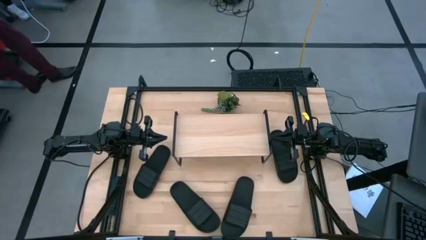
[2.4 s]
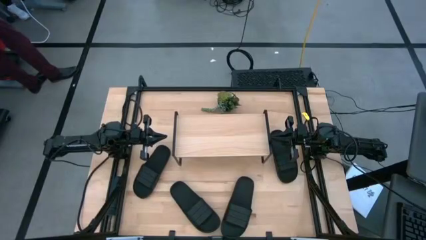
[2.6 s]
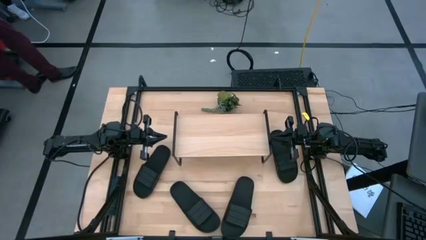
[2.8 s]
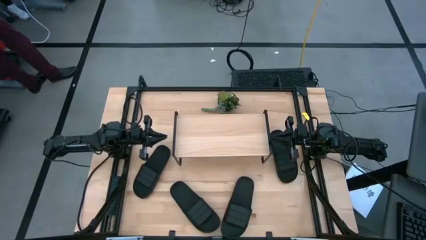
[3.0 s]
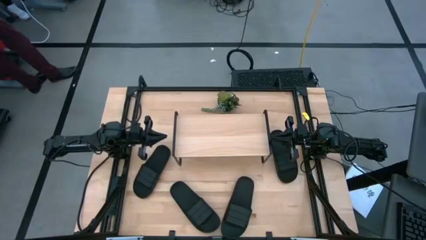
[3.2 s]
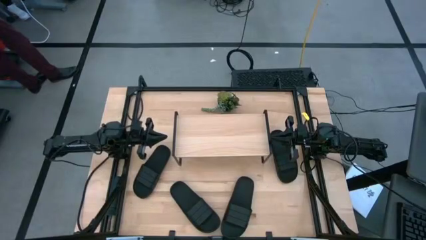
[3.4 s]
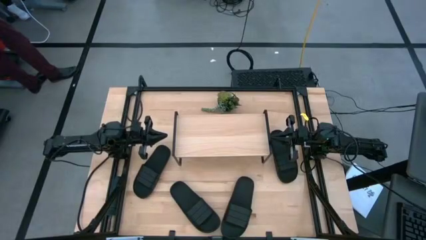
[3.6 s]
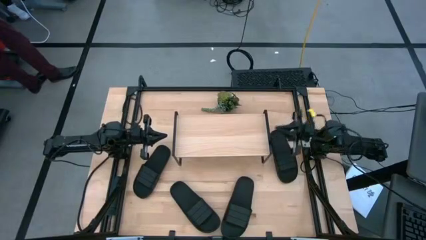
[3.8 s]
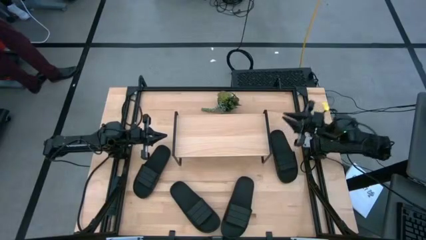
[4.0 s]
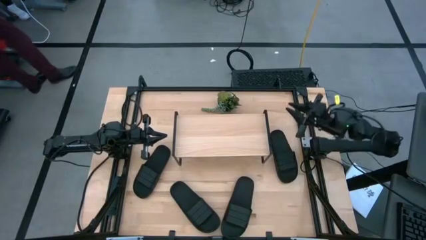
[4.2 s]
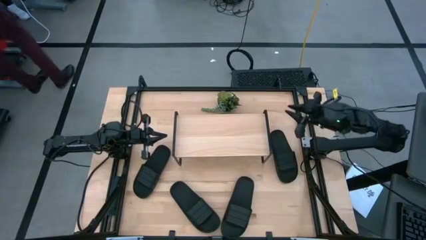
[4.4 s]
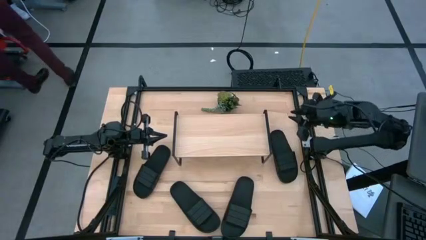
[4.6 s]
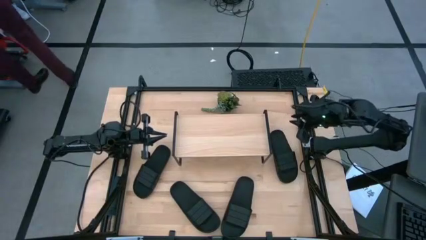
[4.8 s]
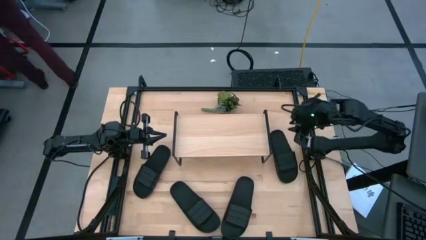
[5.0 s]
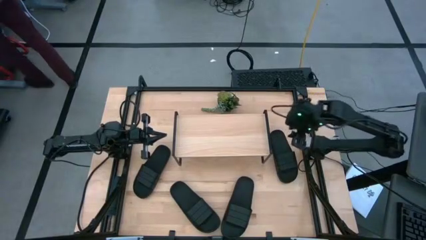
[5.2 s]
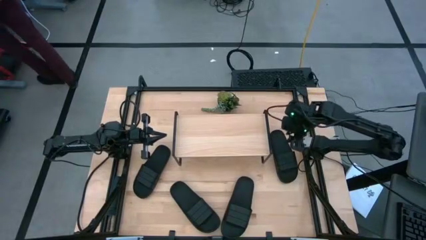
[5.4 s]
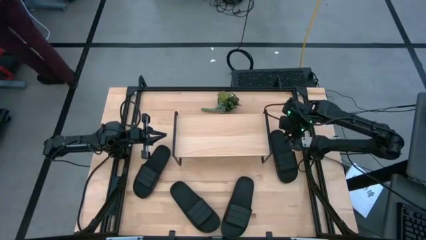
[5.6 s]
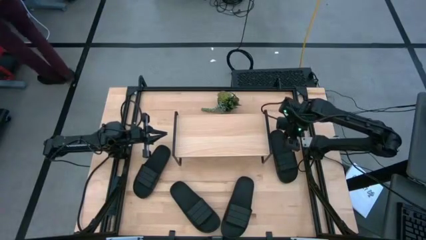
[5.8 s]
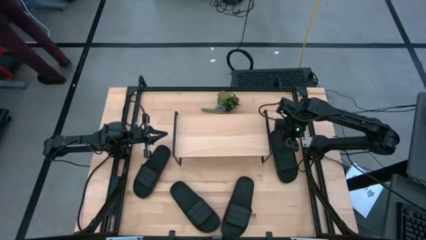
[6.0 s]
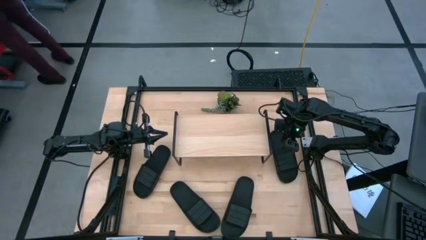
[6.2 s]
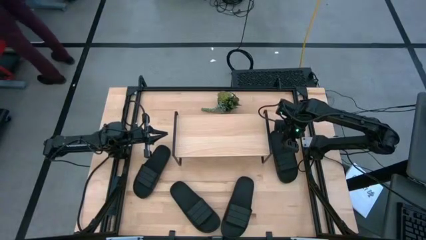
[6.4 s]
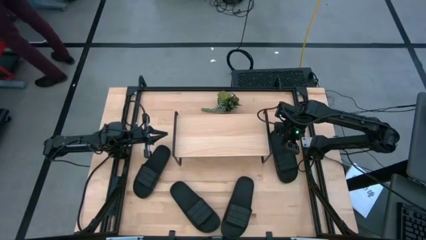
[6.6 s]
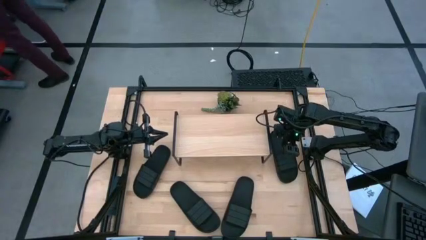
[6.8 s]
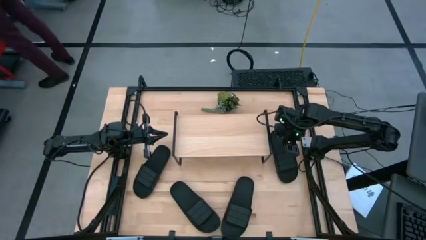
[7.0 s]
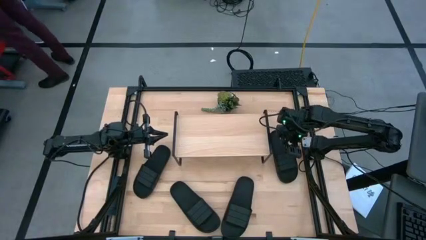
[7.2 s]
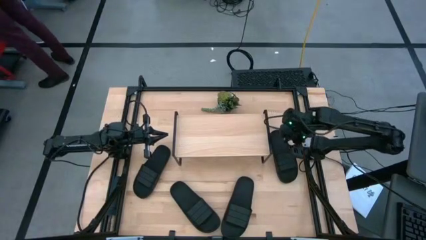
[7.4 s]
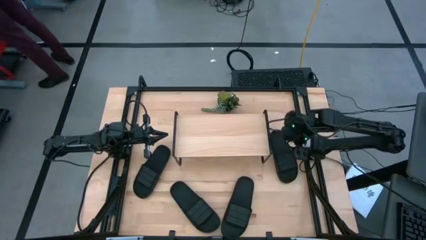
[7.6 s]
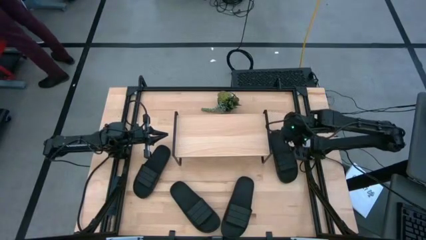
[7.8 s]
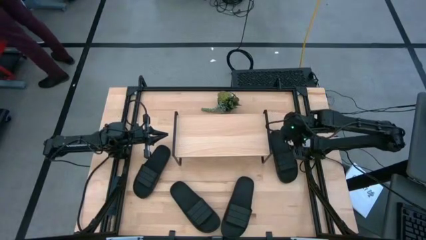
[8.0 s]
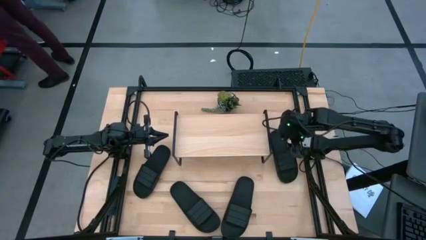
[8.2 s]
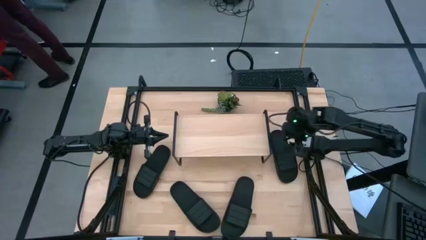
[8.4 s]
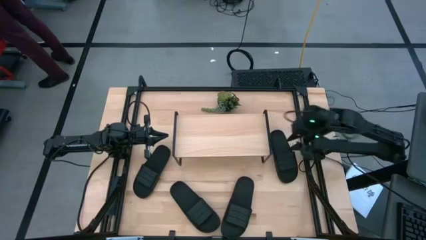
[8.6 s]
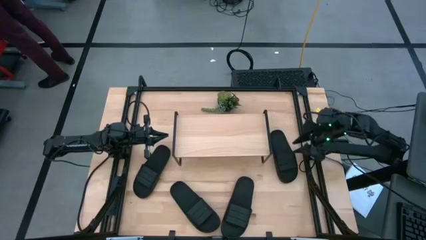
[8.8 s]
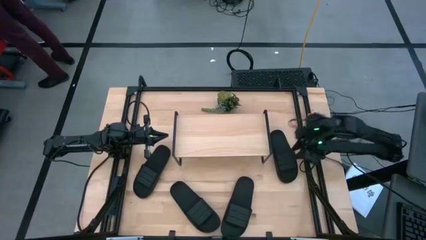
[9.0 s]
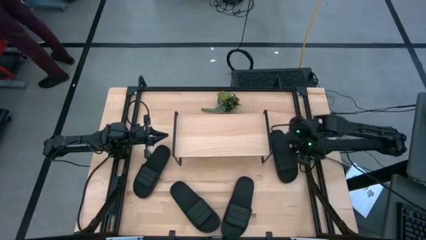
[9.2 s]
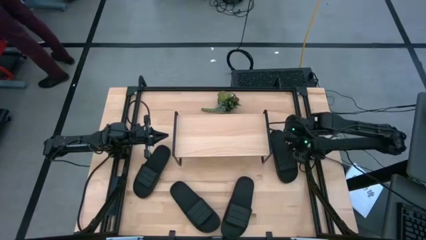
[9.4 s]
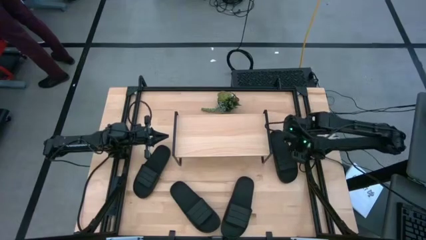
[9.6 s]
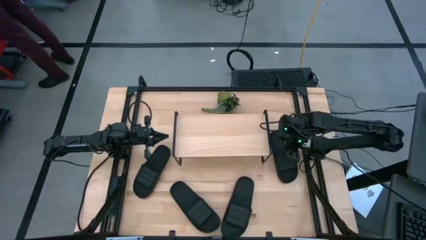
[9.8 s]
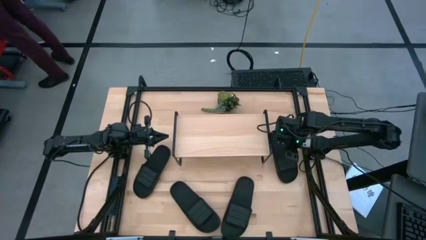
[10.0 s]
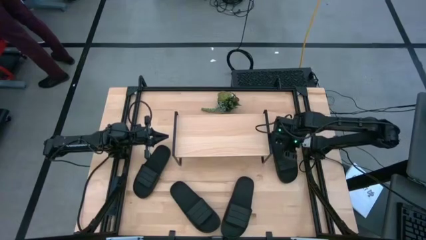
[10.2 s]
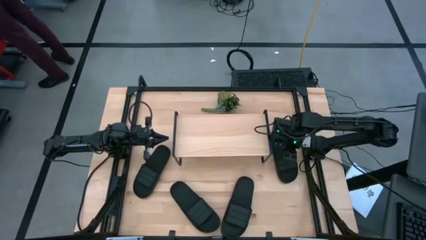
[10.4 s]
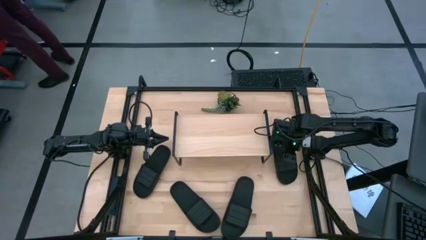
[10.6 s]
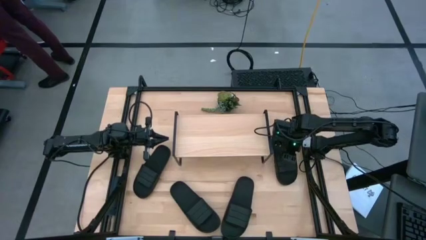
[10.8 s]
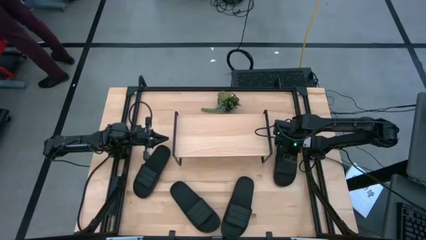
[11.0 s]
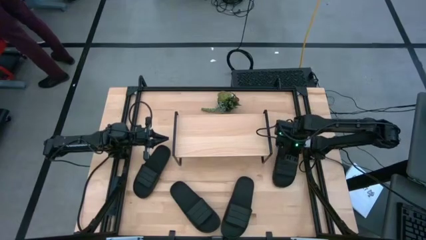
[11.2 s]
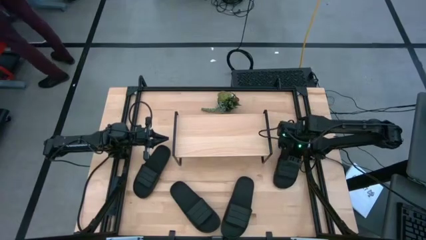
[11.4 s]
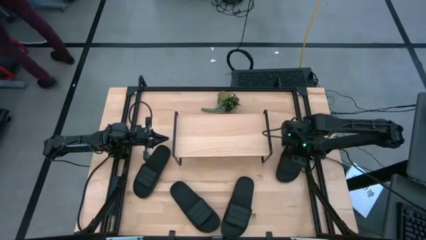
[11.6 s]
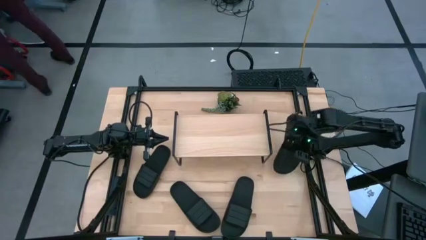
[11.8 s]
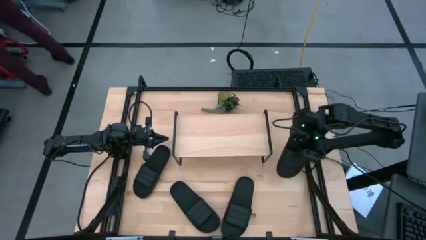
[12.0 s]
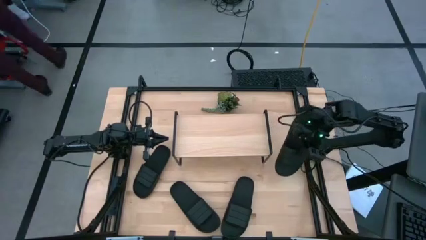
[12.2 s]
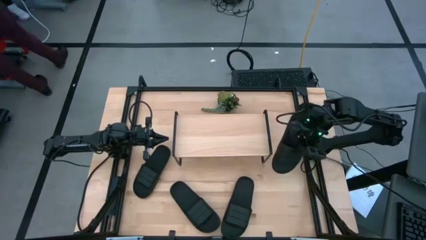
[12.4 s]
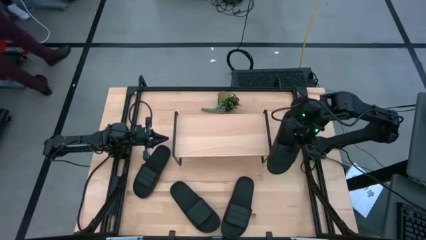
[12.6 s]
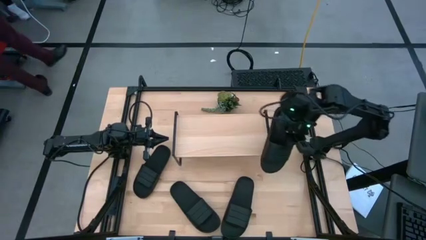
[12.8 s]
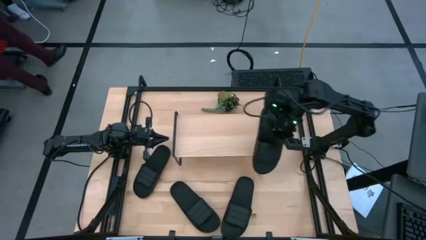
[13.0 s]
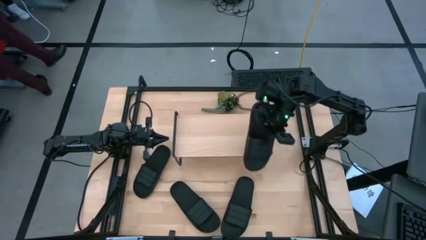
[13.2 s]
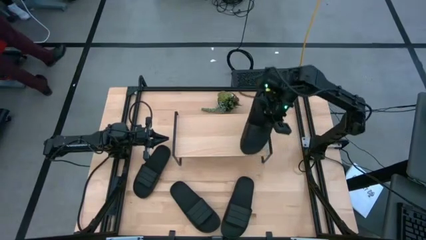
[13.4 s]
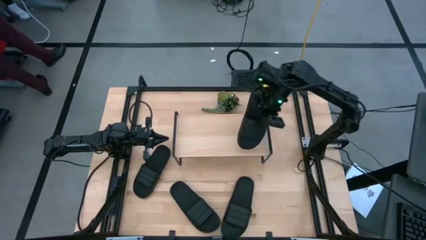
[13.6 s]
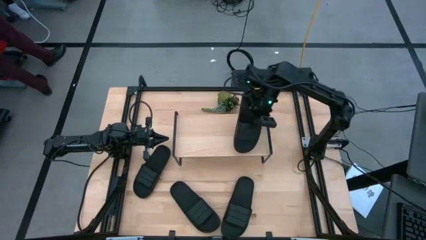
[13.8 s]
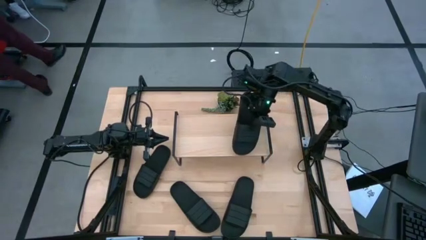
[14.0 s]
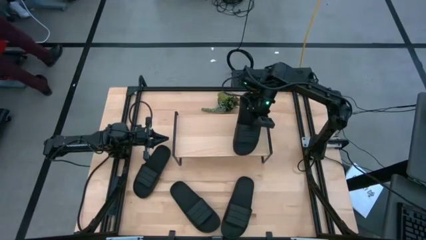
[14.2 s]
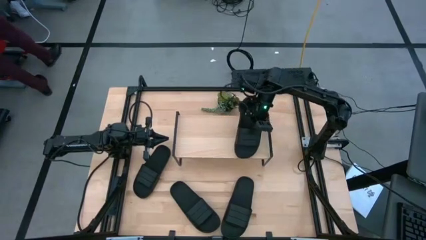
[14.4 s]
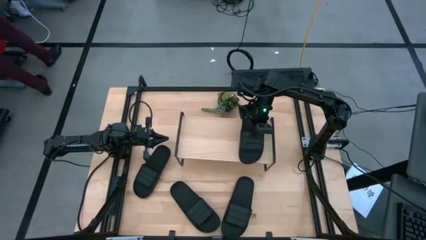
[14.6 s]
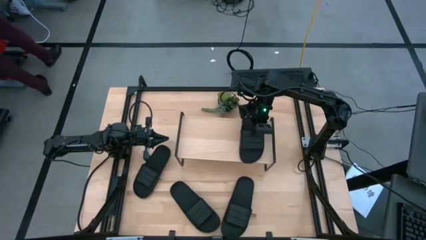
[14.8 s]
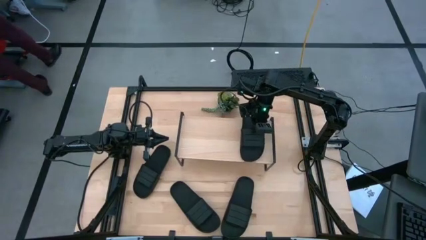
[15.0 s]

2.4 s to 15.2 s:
Task: Pick and place slides into the shelf
Put the black slipper on the shelf
